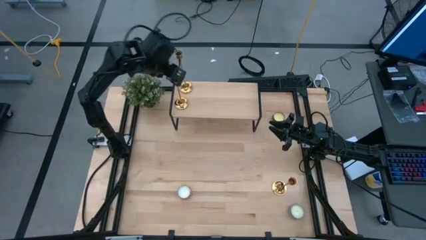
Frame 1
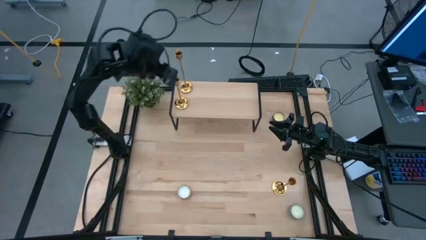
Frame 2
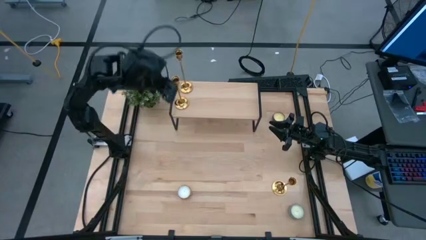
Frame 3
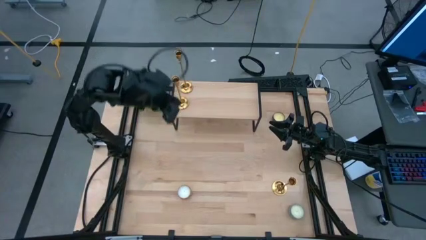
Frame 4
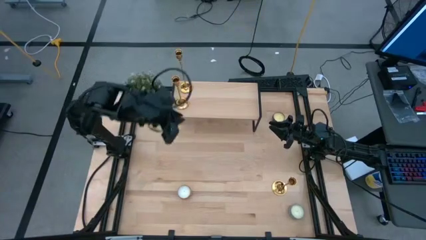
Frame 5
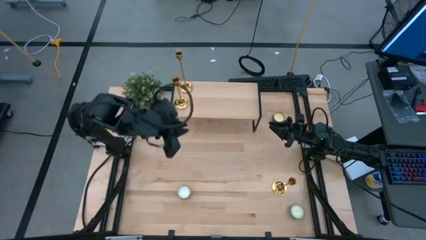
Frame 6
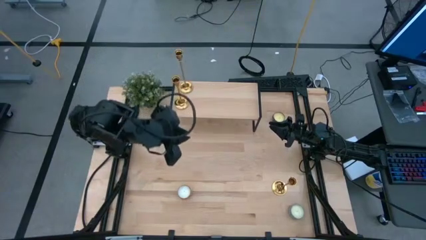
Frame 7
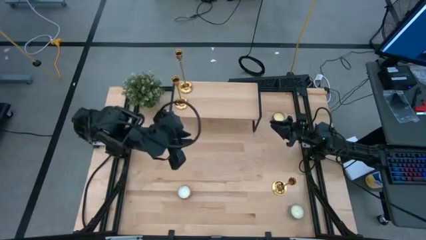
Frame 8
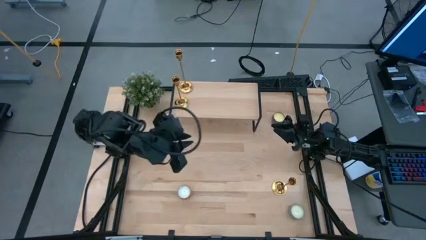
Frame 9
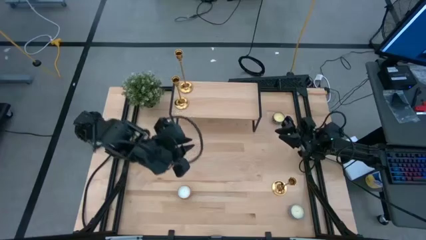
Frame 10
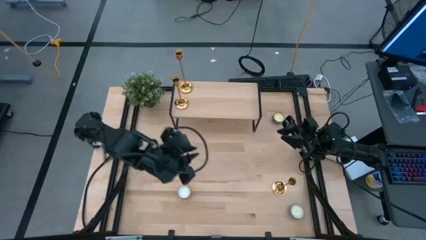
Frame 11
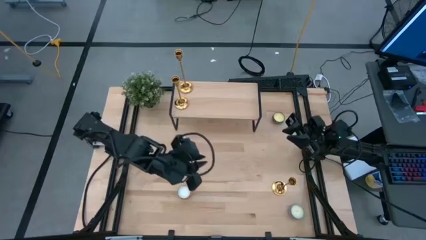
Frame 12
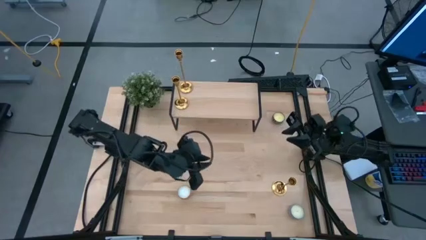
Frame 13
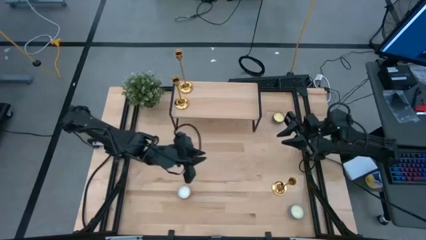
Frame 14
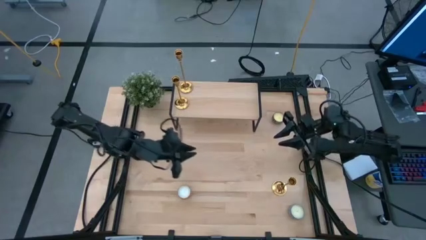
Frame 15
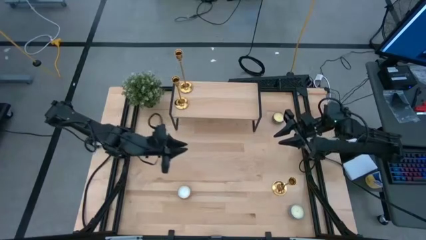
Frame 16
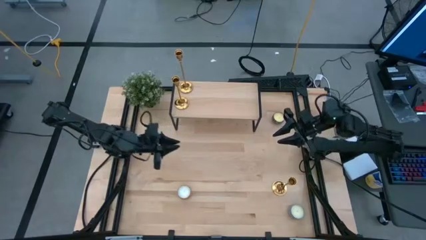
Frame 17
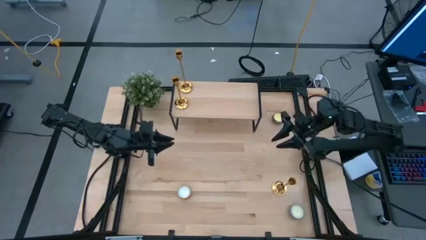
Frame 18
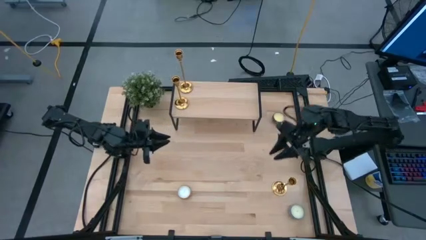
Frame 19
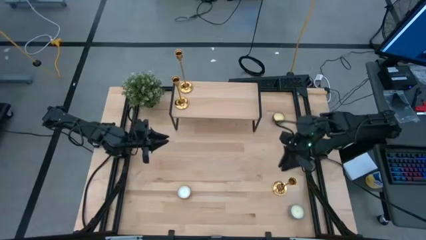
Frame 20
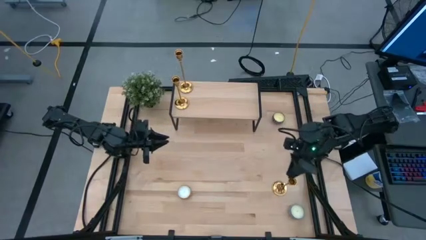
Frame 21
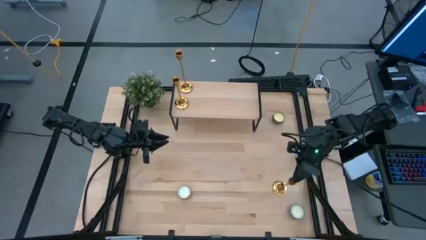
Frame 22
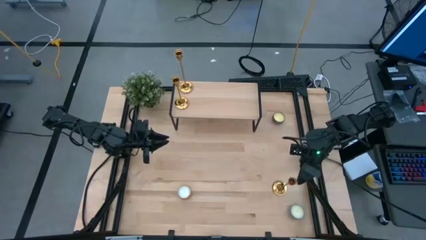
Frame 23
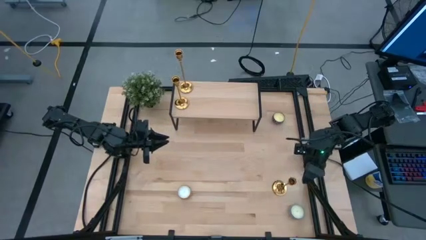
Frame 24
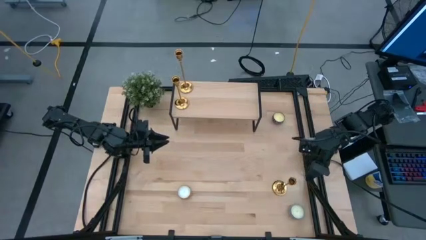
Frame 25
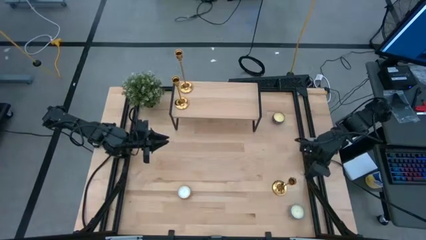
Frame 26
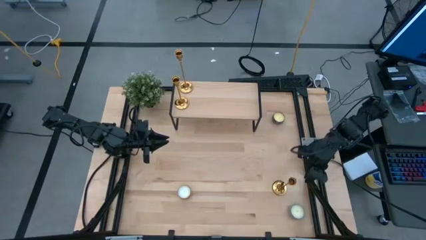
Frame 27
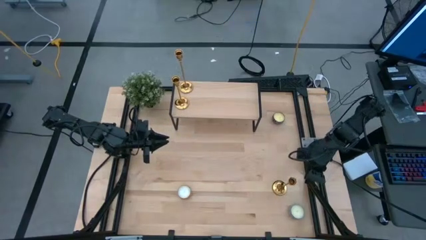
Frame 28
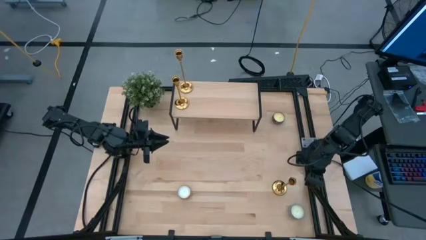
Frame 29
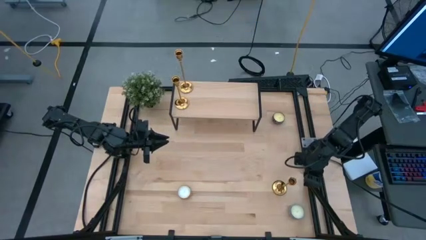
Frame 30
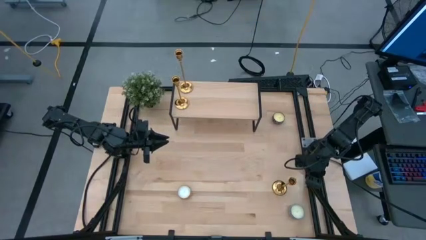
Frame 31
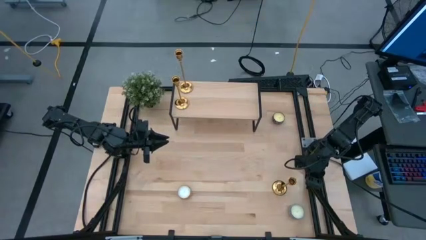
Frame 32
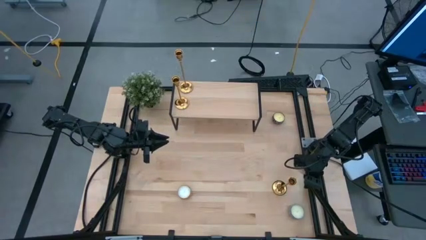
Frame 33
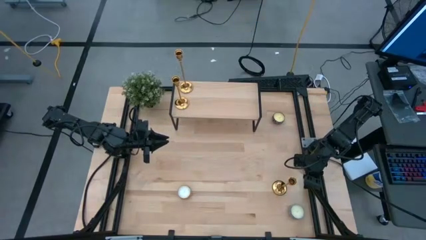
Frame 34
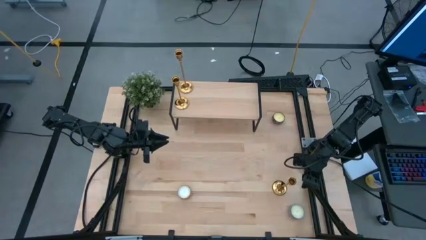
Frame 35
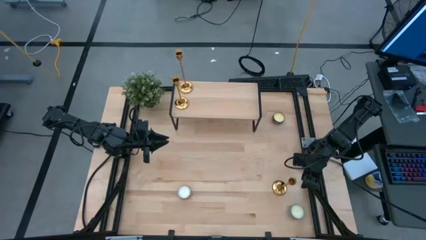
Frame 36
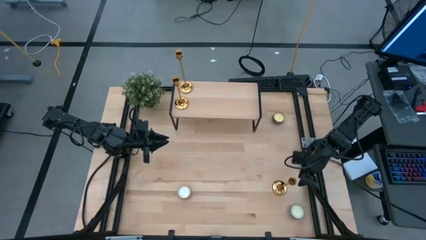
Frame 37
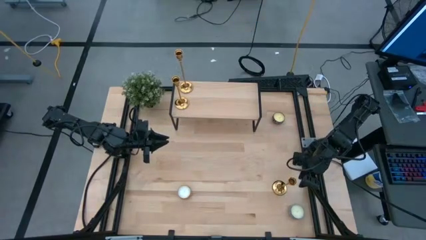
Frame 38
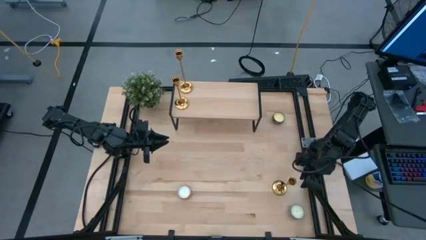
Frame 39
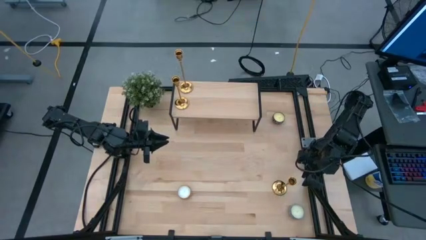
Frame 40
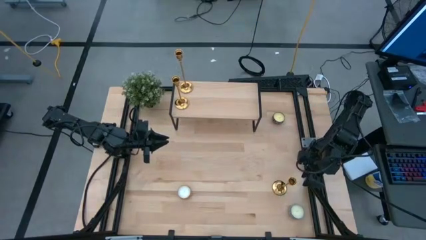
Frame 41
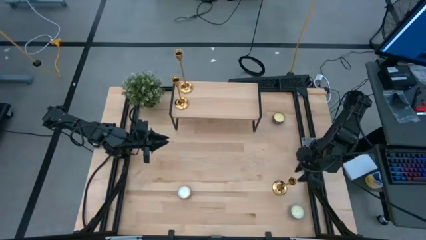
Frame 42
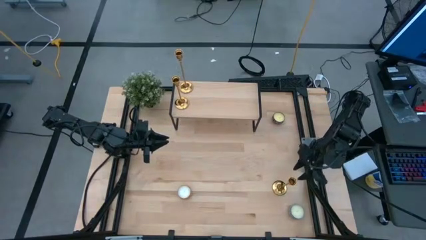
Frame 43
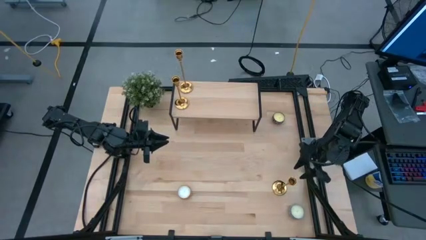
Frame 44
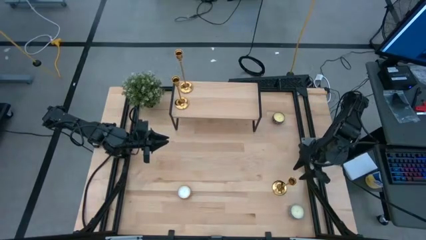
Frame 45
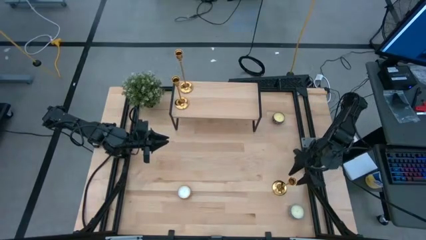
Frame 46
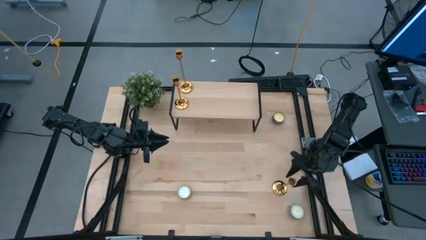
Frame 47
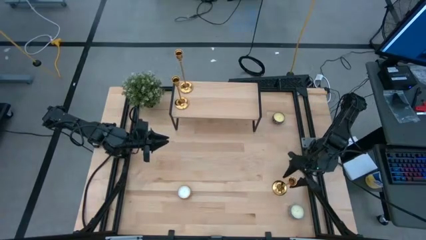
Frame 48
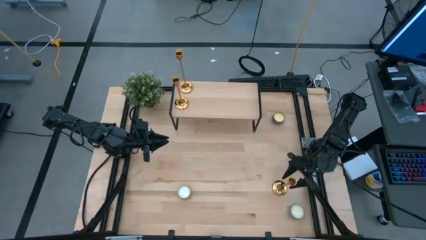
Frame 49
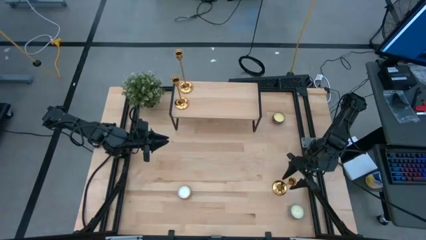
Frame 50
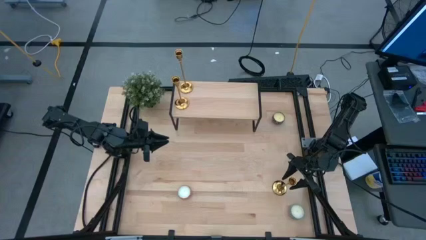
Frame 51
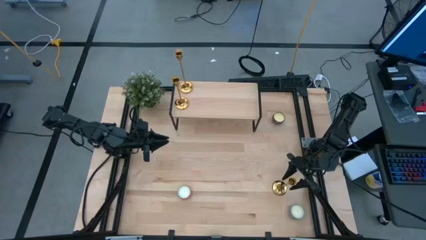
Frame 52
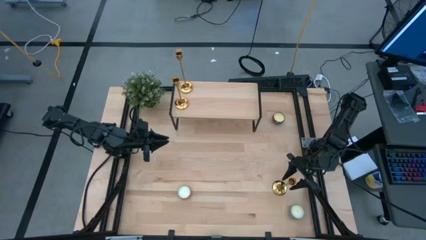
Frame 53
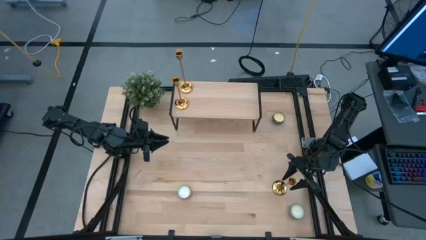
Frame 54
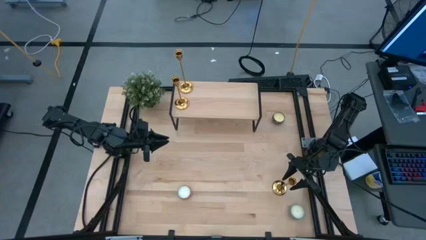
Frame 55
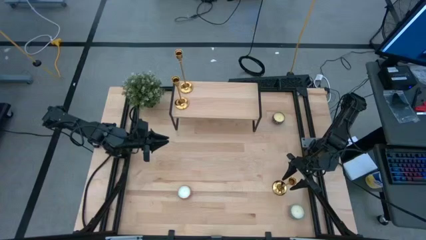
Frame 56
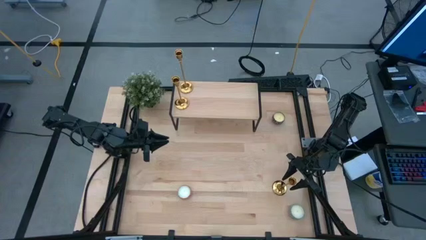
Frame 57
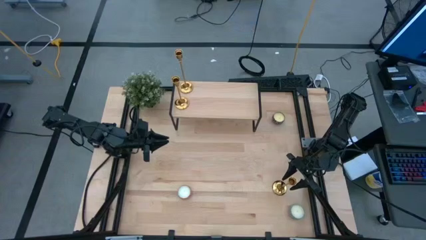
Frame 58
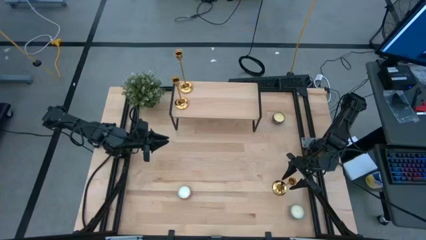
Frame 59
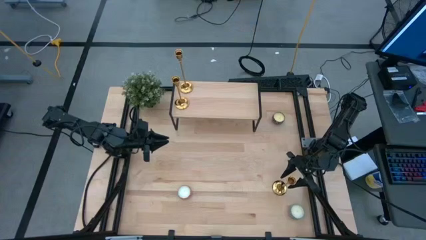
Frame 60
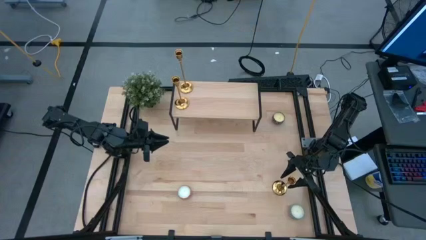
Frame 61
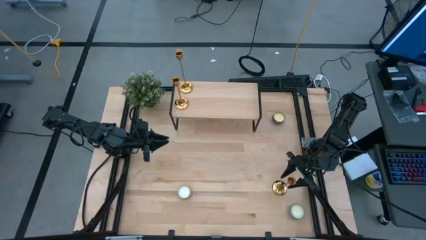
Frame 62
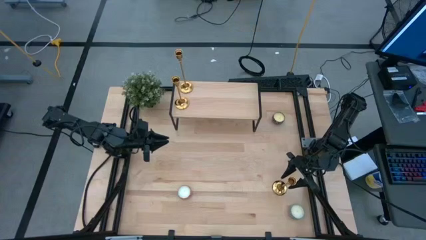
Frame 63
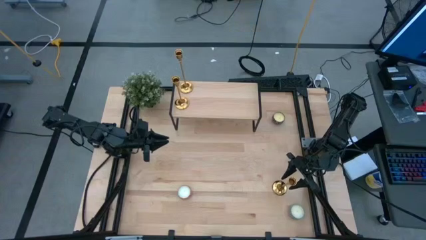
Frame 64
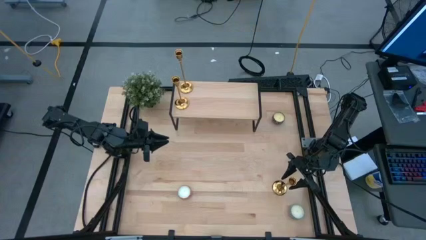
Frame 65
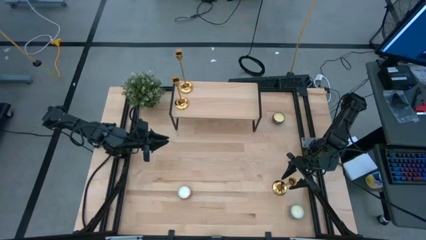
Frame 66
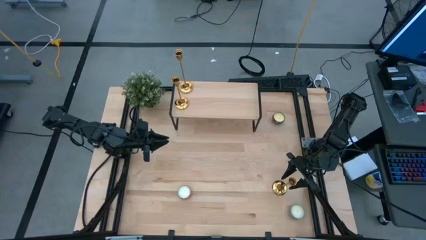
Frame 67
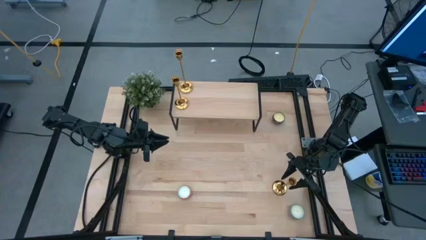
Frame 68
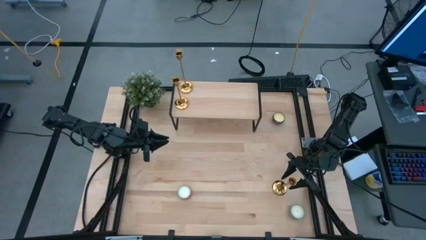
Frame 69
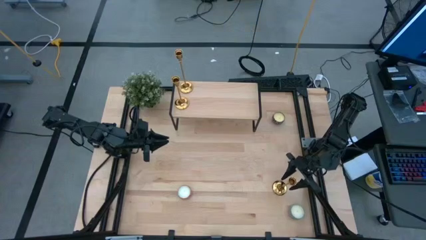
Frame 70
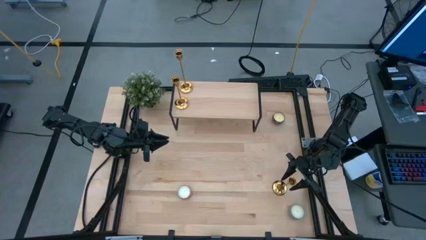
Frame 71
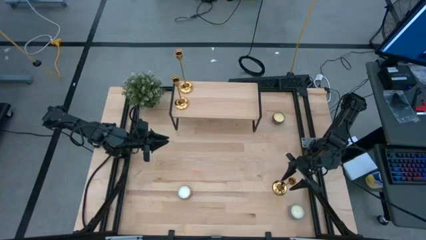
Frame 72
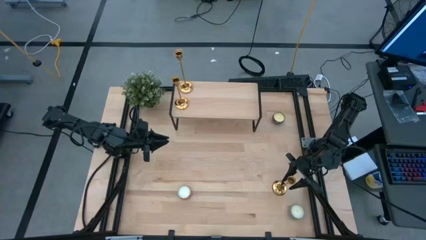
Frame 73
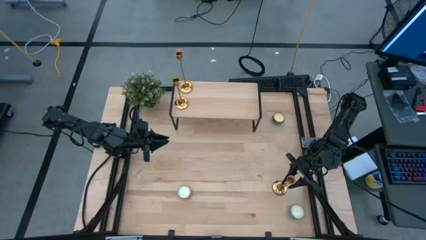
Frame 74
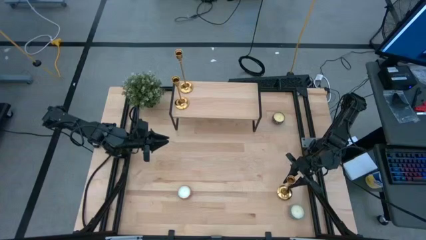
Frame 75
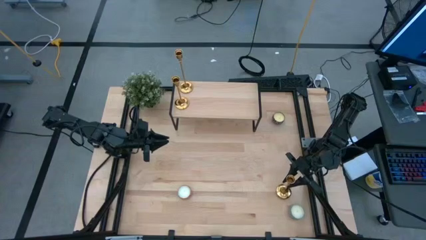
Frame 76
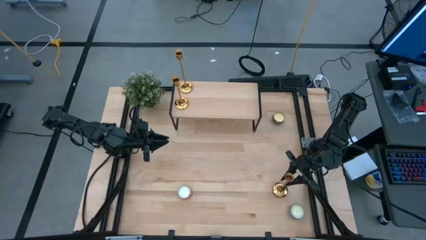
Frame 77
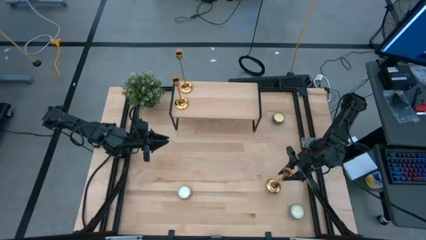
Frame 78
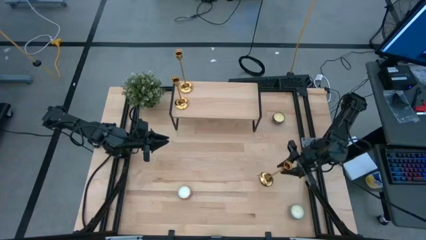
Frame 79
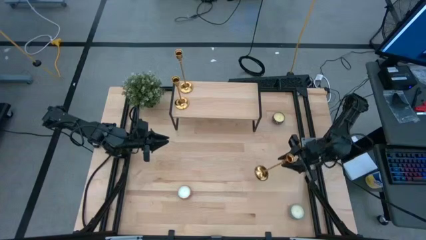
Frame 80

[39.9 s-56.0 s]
Task: Pick & Place candle stick holders
Put the gold candle holder on the shelf
